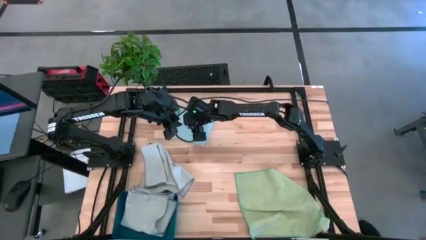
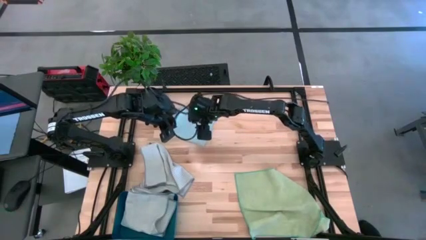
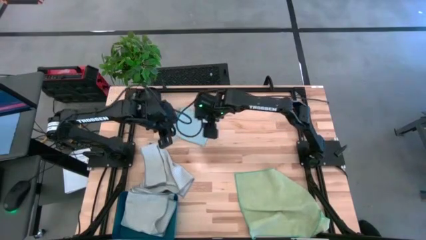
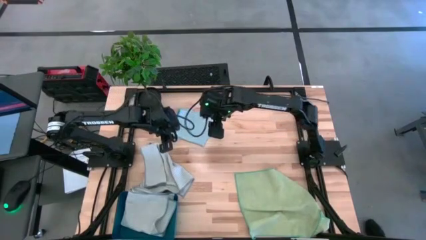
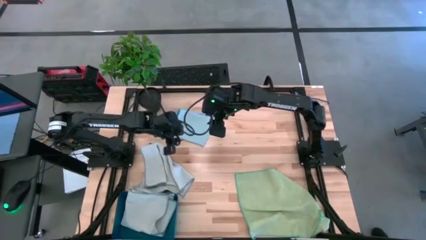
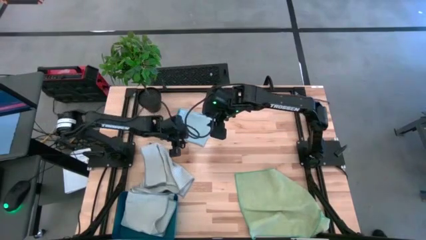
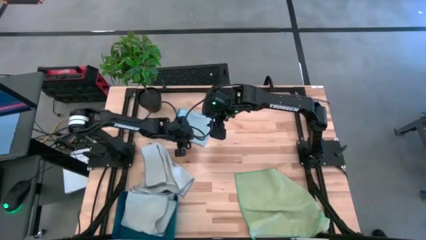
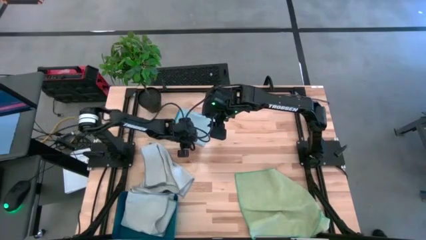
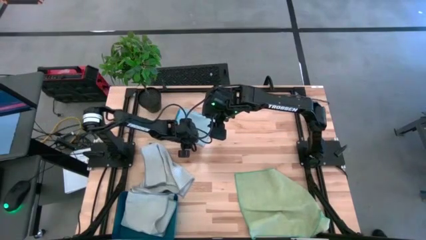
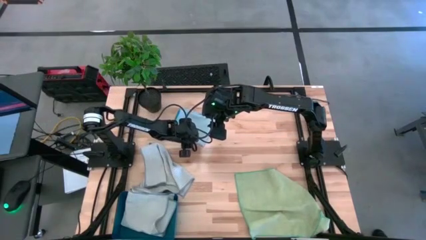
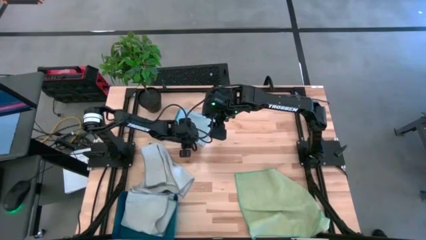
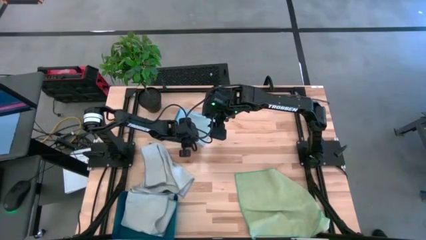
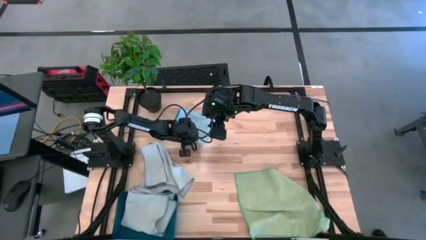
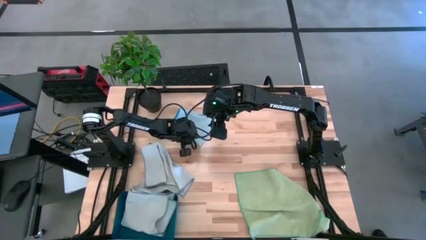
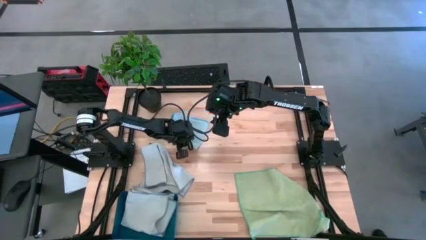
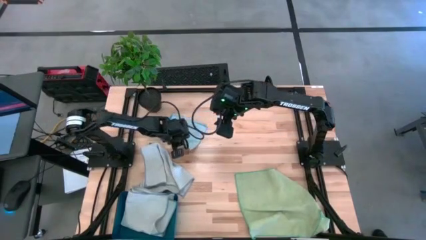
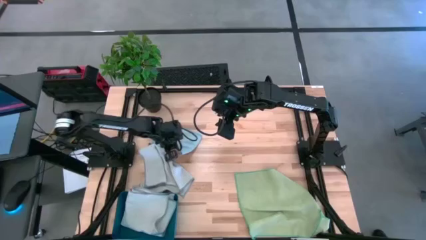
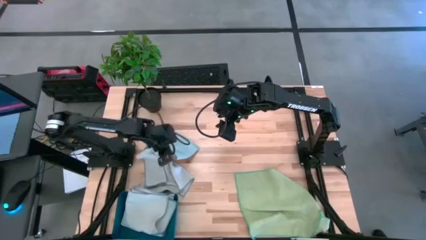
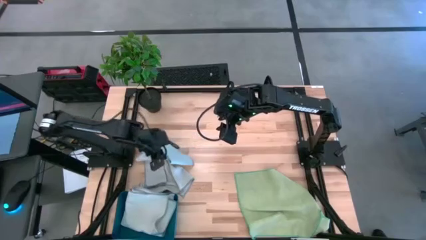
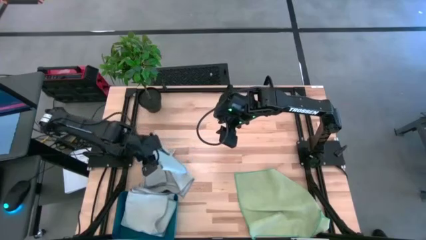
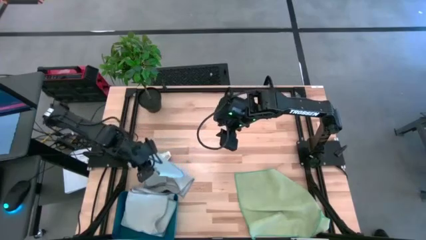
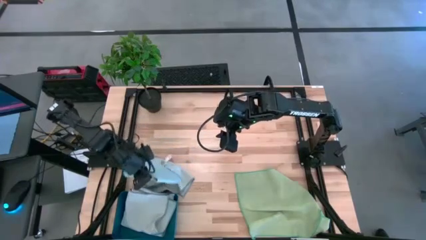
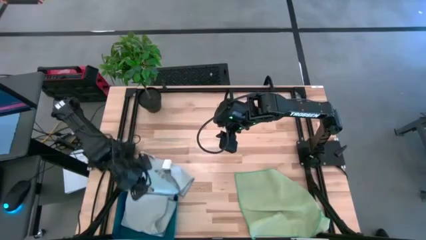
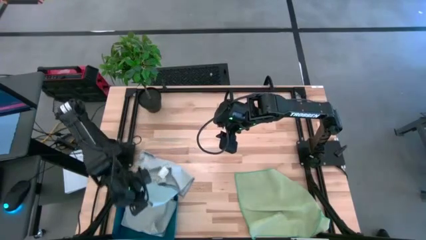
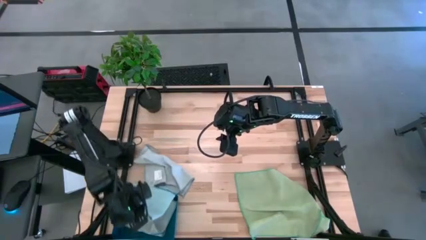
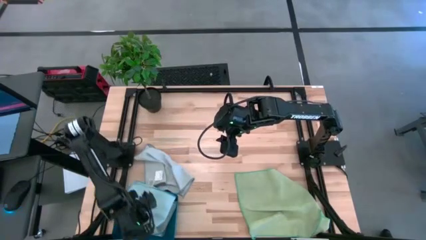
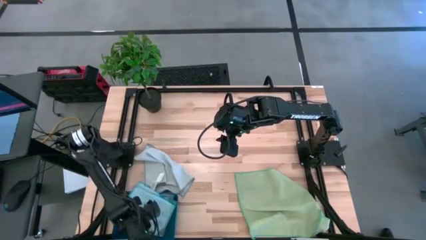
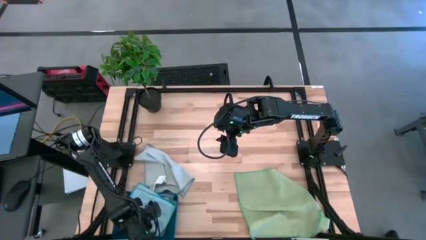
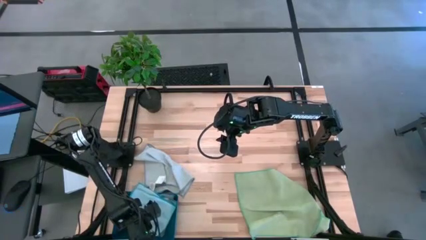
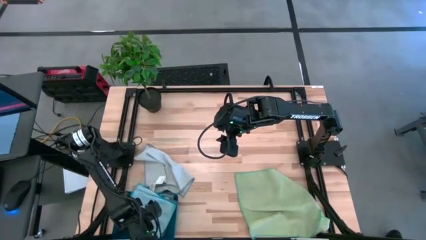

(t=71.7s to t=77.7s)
Task: Fold microfiber towels
Put the blue microfiber towel into the blue bin

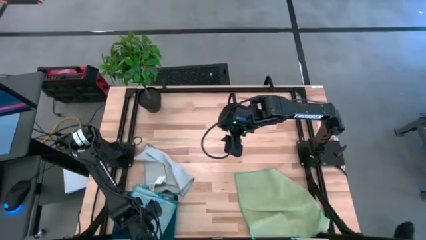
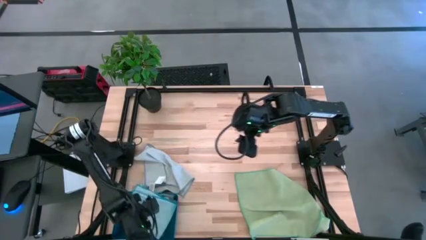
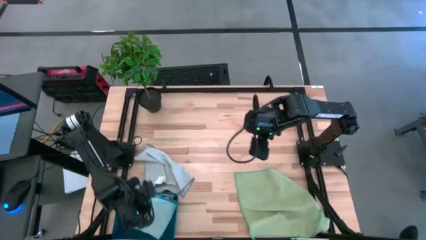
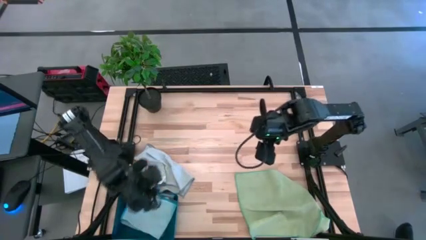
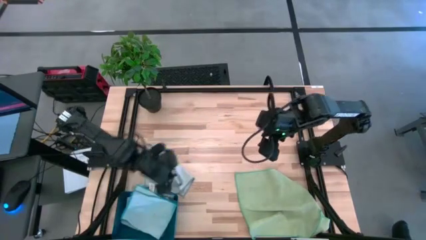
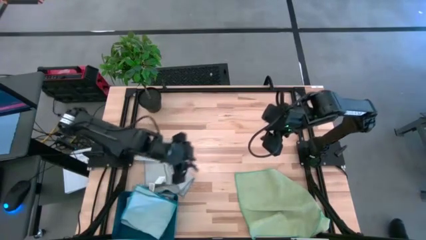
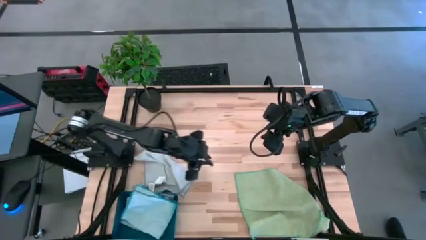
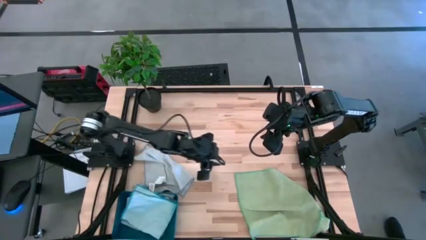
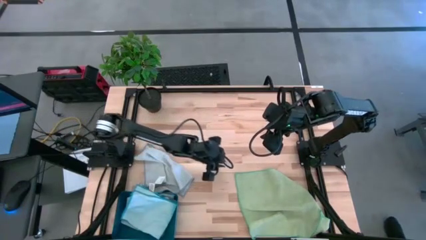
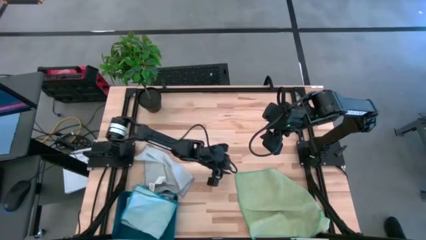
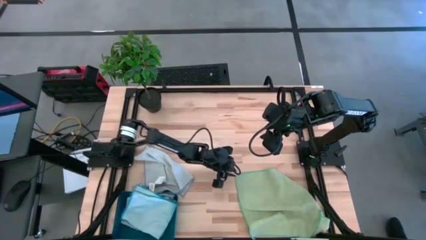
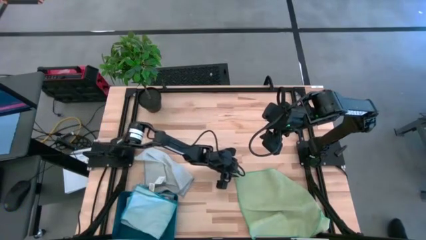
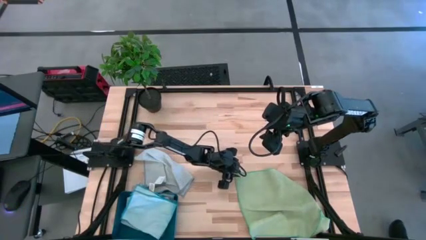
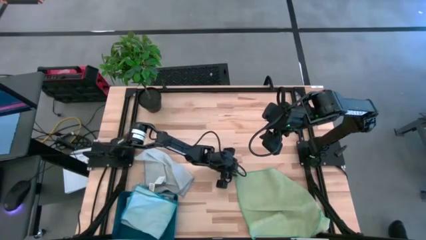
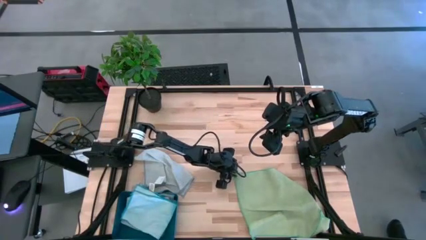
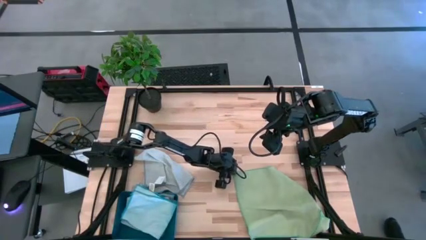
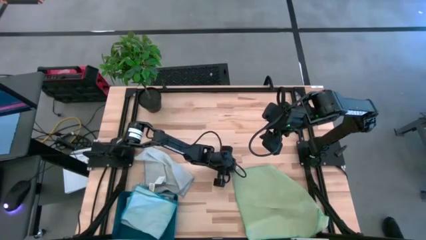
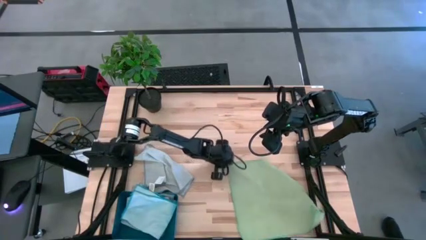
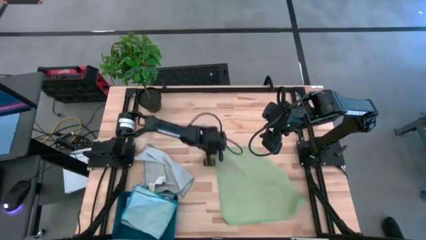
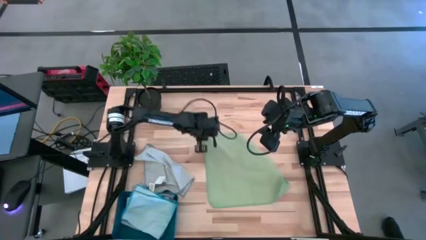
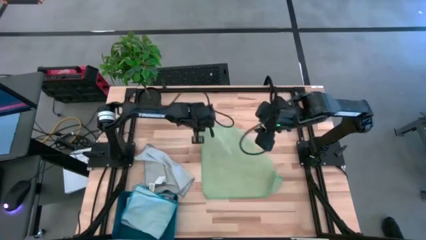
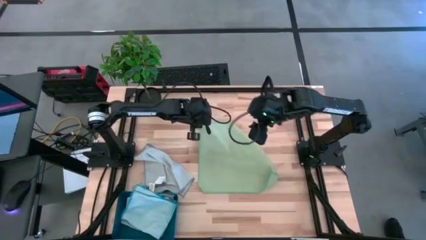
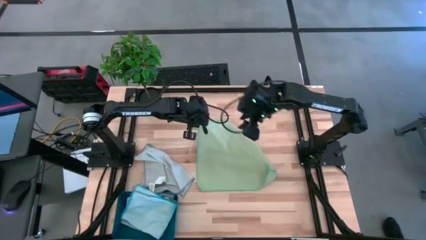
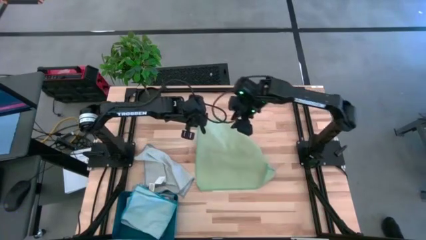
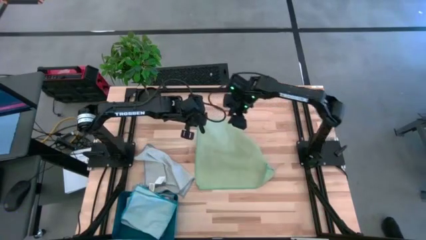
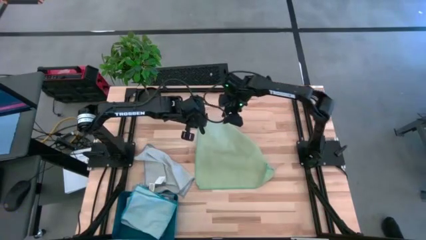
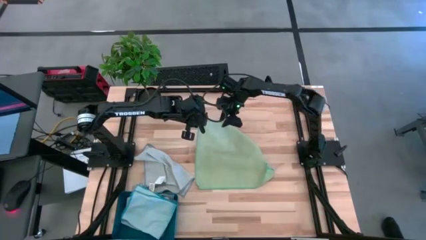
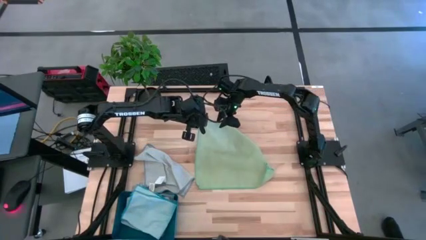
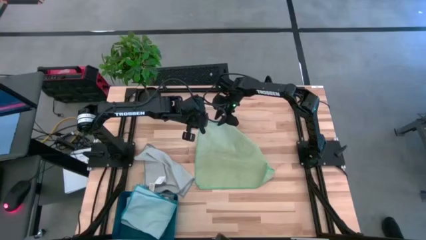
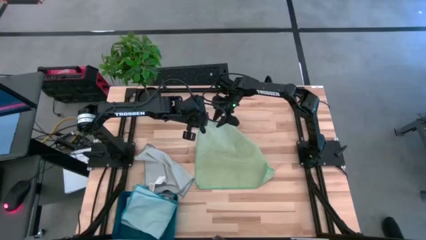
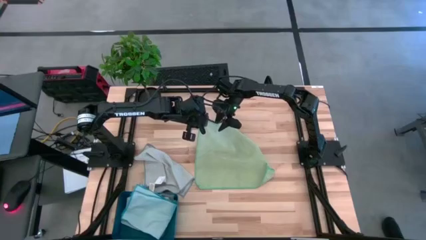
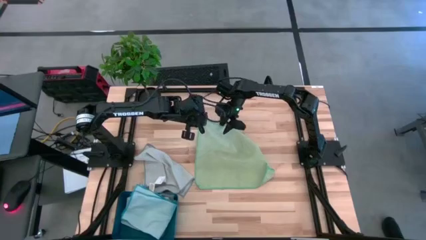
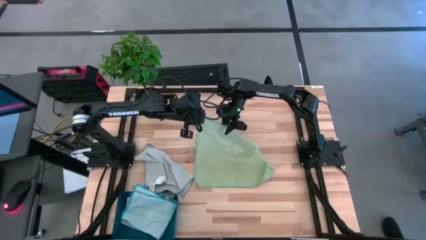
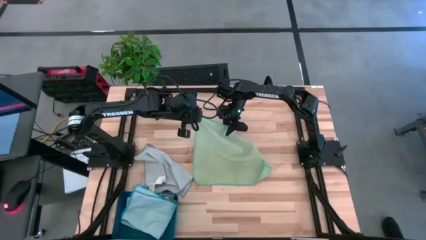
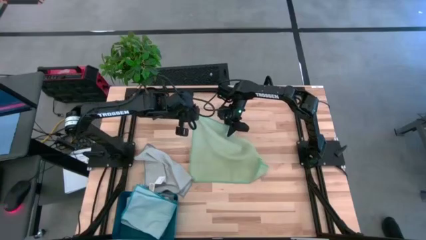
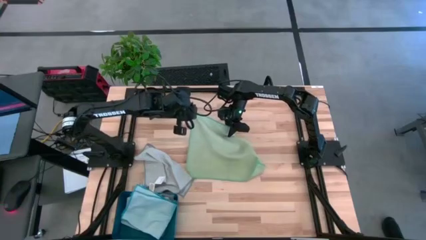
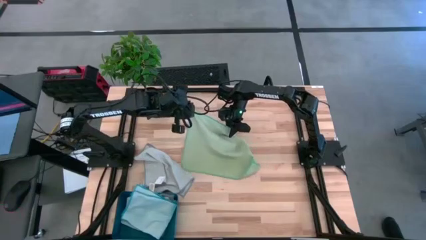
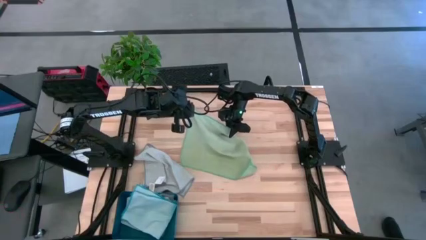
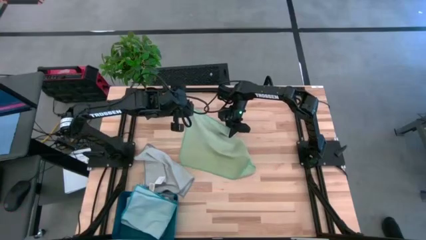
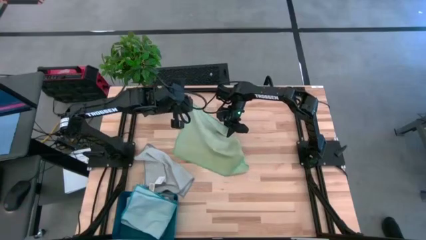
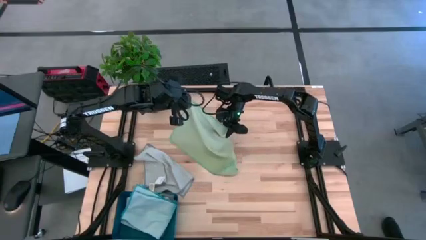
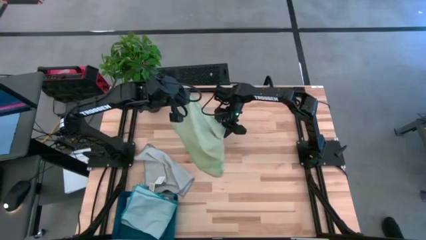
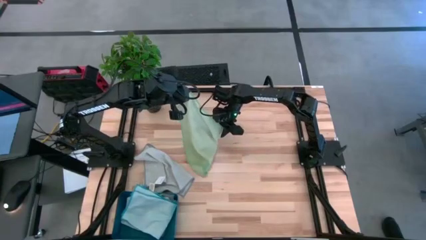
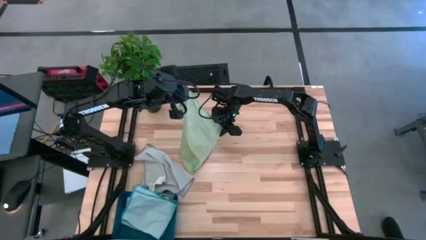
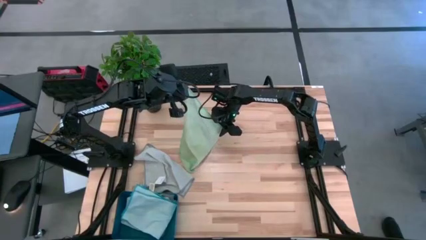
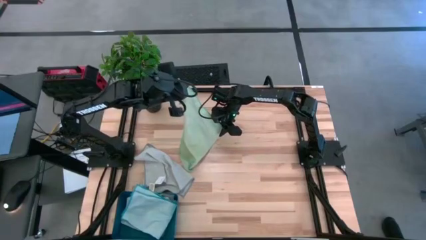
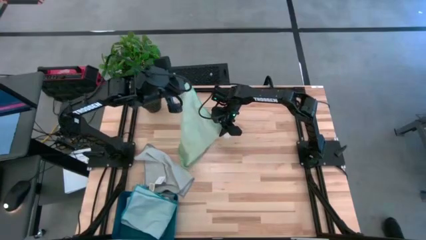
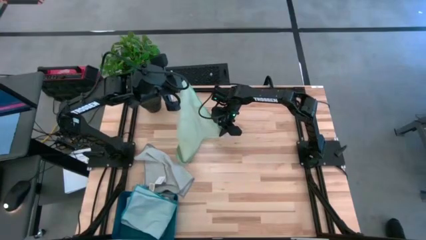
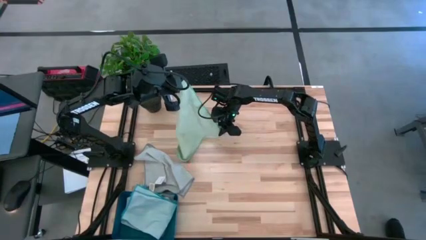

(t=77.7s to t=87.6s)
Fold the green microfiber towel

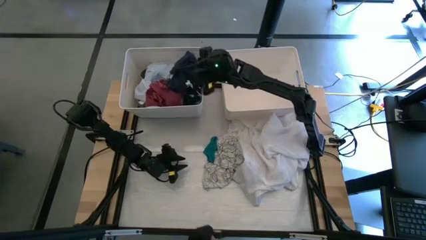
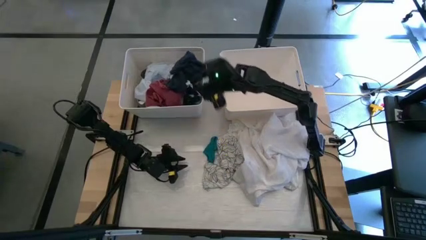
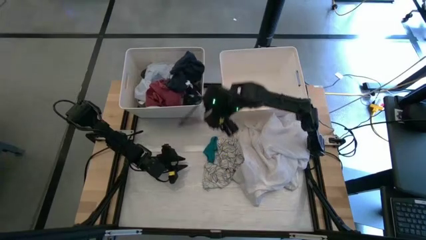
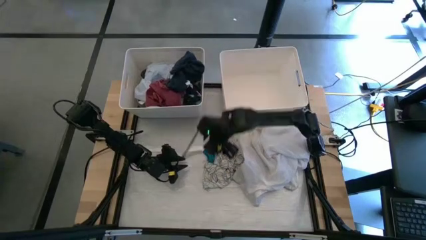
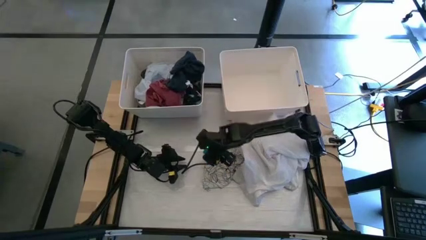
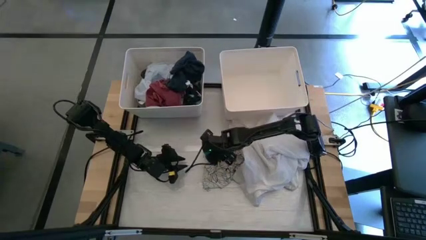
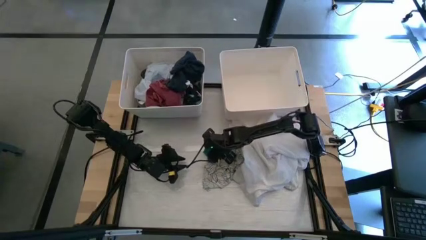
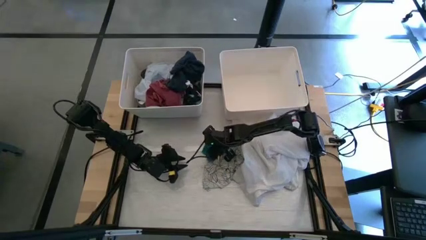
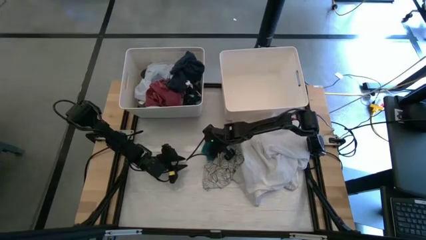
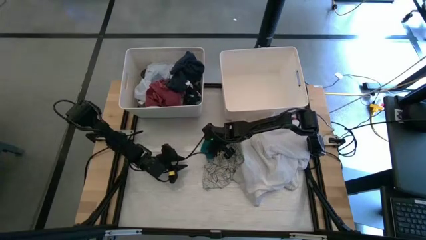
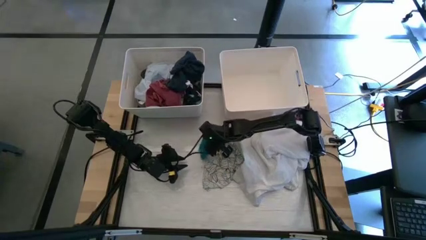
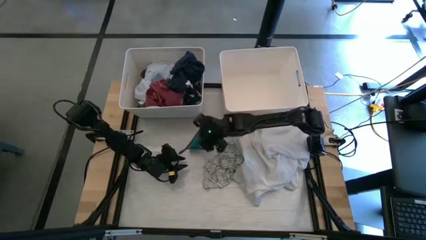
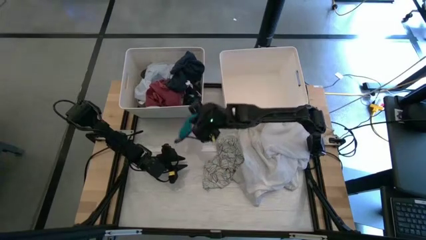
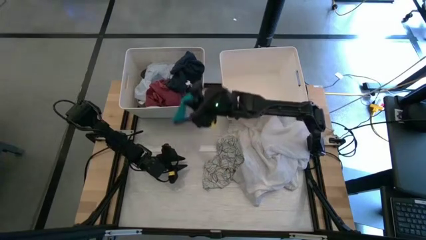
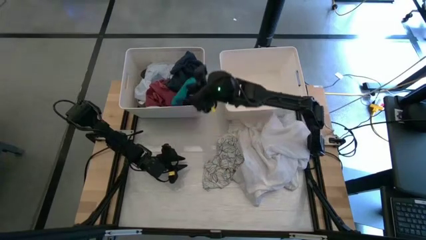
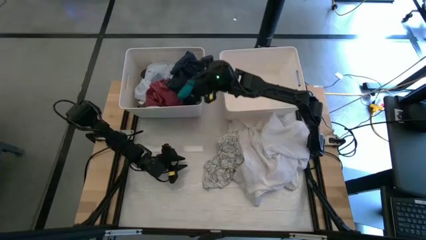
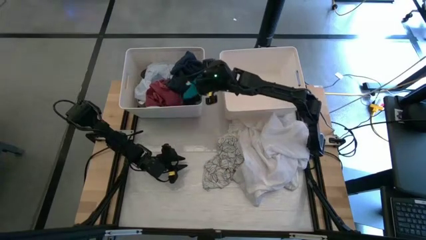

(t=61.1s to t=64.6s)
Task: Sort clothes
Put the green sock into the left white laundry bin
